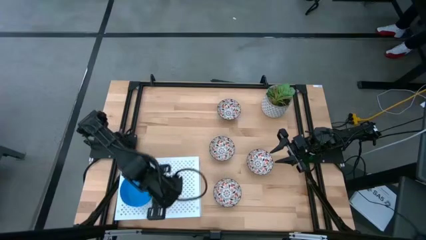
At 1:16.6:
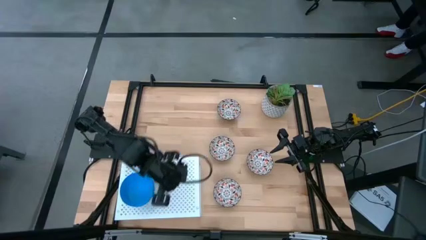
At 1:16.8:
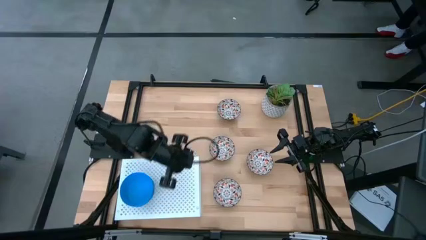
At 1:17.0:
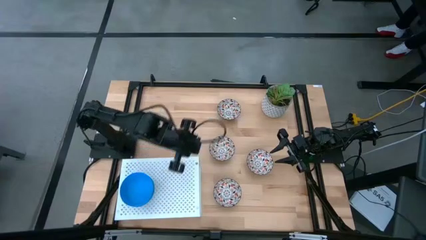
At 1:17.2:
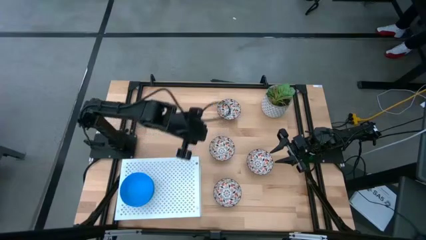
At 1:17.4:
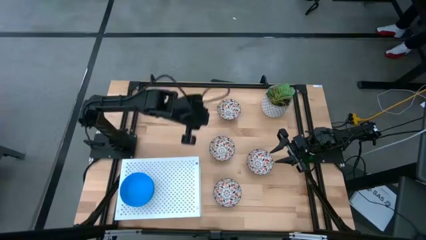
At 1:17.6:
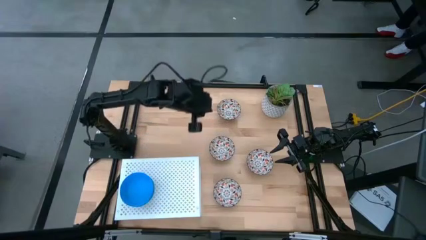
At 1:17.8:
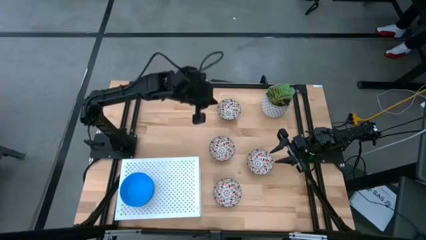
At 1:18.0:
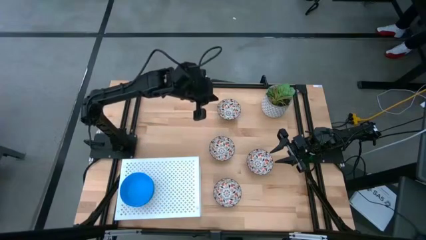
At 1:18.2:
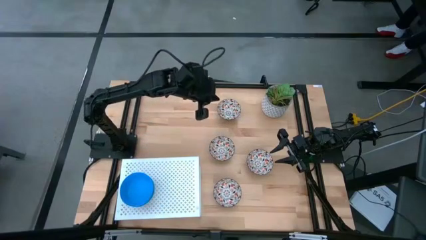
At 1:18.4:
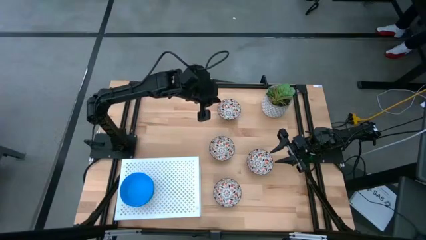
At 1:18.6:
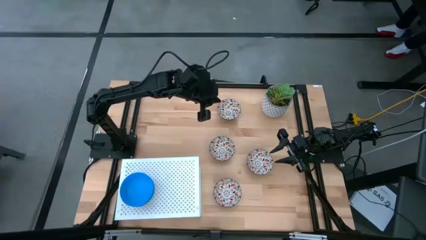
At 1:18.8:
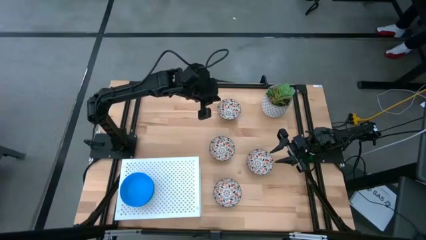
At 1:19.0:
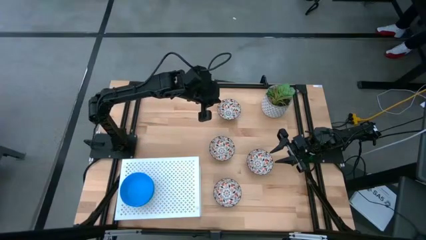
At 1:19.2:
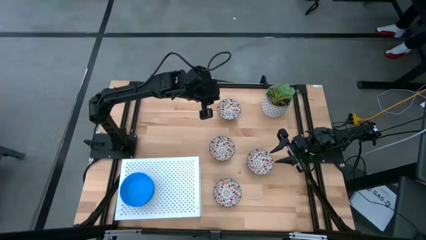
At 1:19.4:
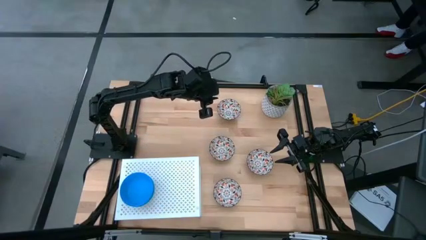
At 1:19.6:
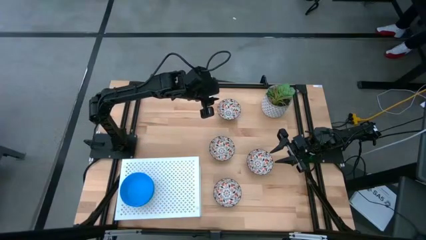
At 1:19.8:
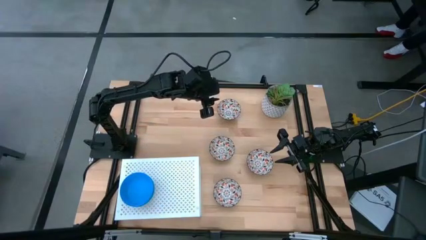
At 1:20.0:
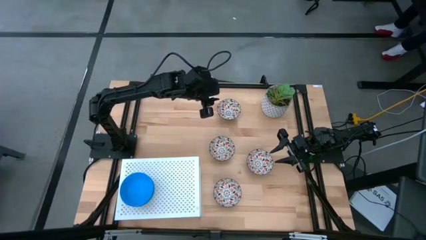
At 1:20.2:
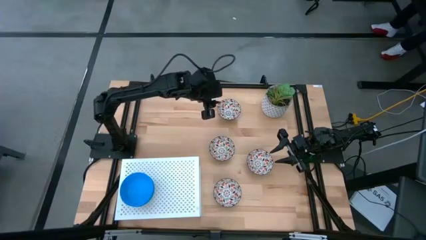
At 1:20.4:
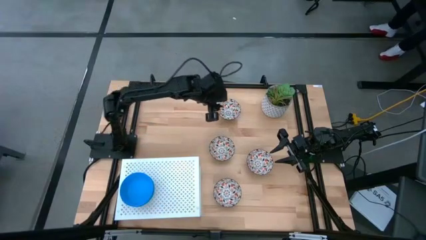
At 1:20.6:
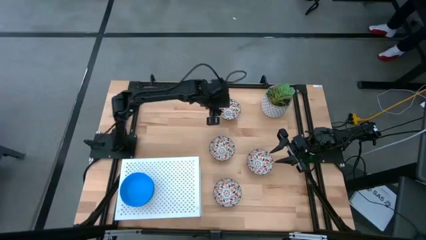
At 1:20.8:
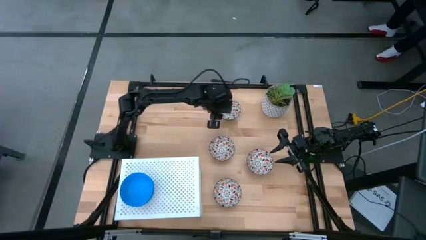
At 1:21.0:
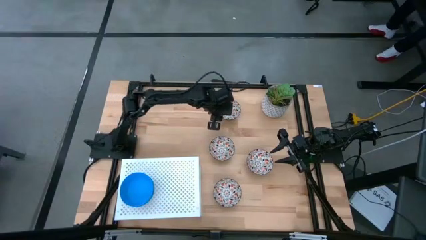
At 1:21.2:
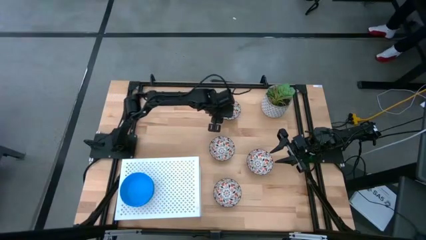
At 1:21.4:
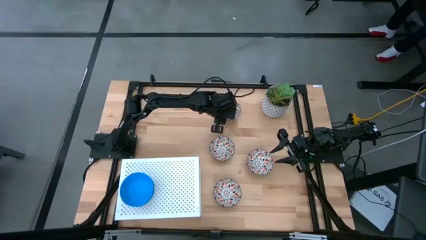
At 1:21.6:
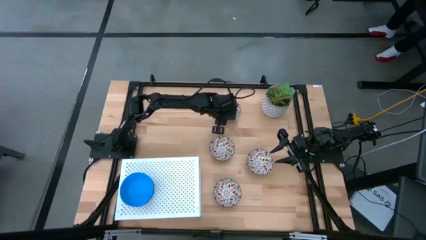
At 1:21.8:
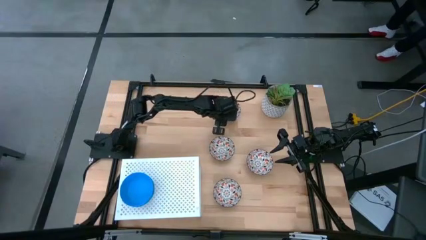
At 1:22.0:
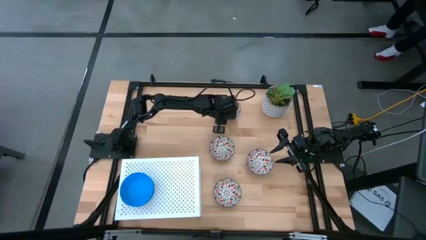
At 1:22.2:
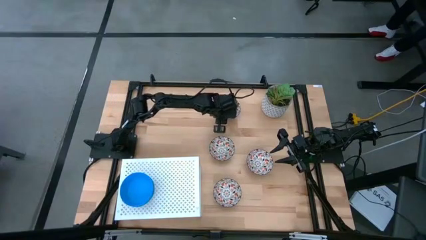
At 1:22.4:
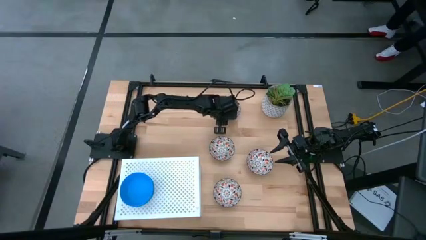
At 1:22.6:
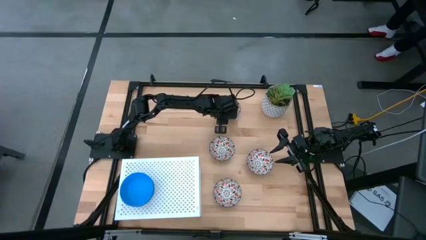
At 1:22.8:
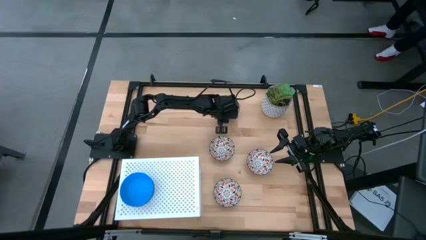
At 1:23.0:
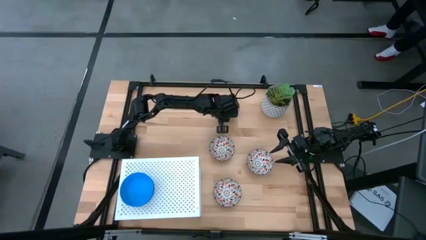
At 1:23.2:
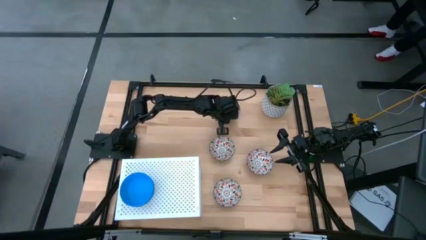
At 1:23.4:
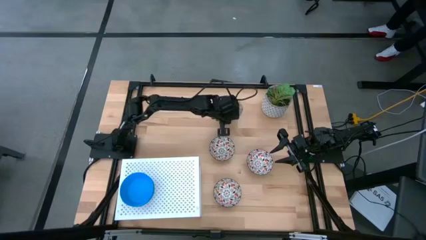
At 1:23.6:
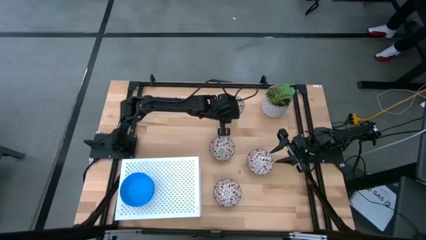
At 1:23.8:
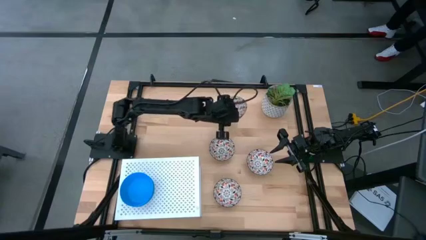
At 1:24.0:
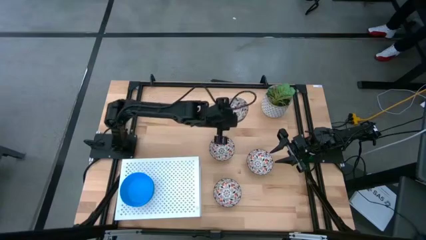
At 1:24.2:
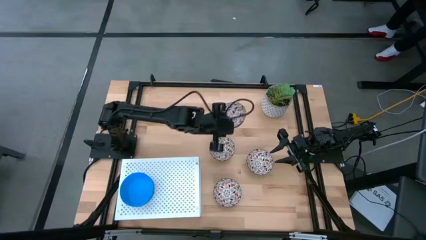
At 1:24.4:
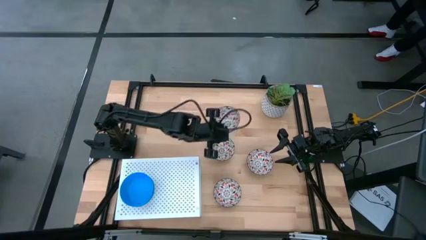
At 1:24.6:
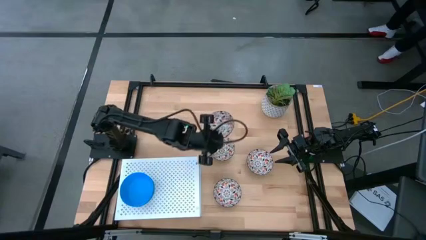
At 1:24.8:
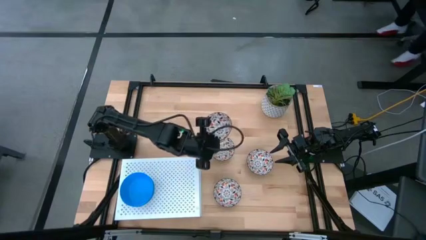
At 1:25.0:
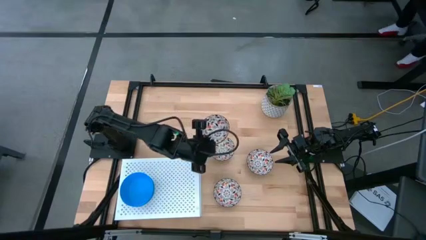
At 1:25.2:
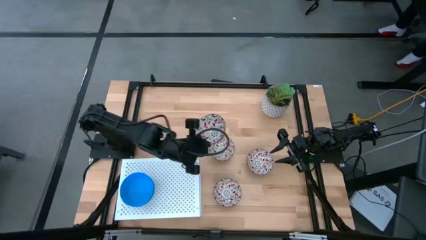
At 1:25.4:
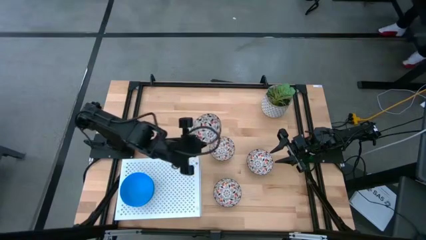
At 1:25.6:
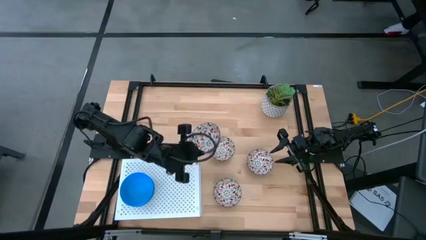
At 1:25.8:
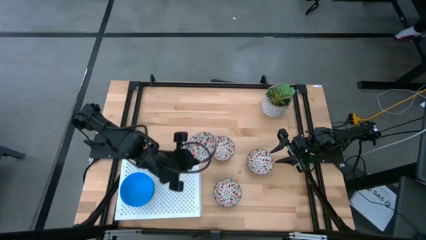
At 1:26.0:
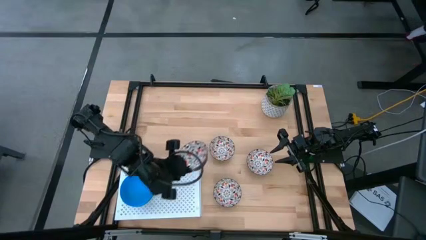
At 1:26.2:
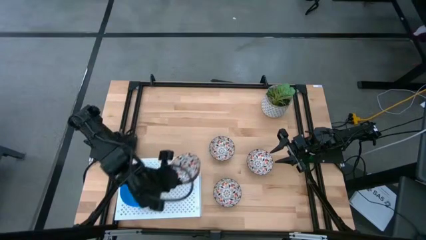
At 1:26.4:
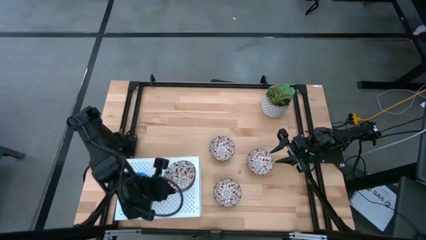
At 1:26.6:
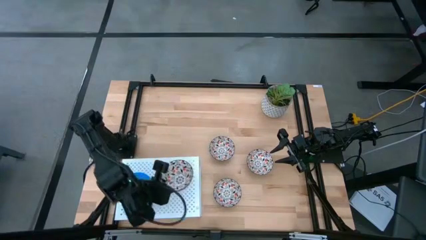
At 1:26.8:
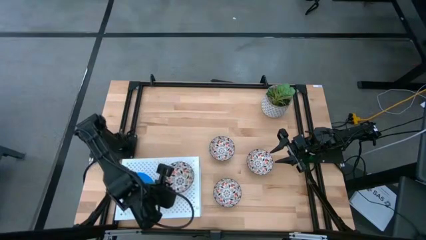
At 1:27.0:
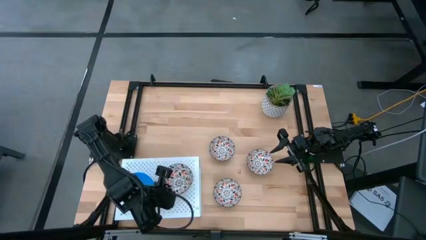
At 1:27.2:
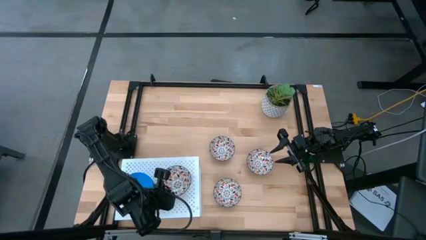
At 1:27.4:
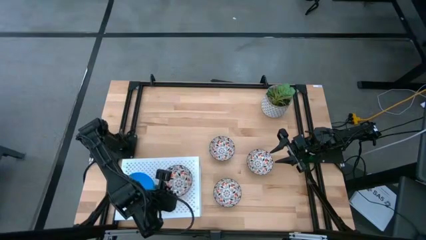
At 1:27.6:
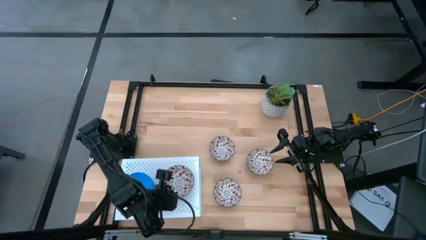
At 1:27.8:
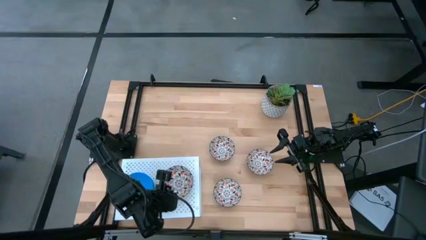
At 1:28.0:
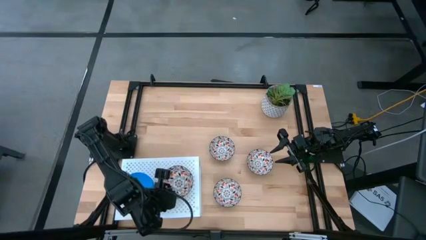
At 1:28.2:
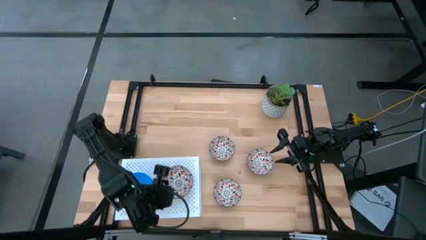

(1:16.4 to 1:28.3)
Task: Pick & Place Mini bowls
Put the orange patterned bowl on the shelf
